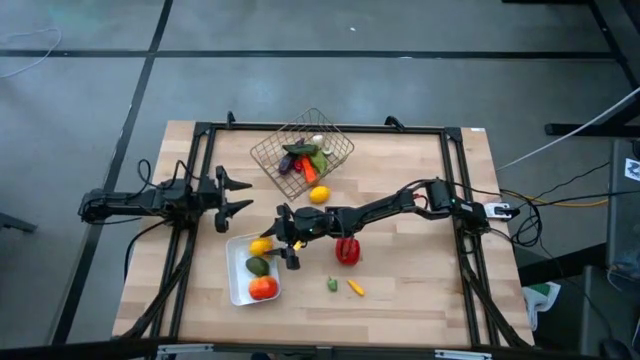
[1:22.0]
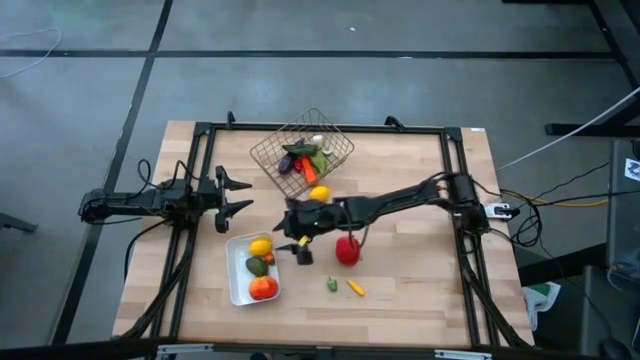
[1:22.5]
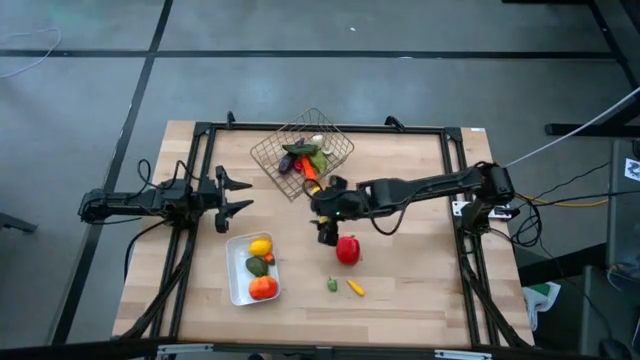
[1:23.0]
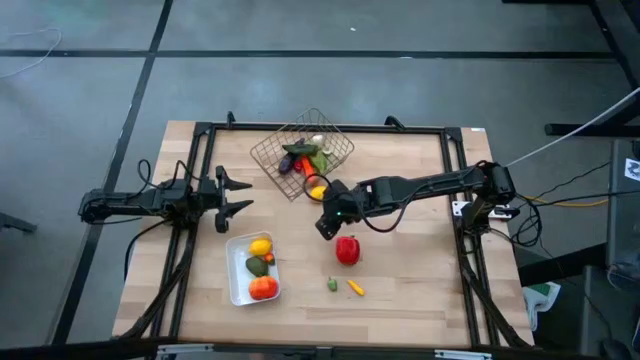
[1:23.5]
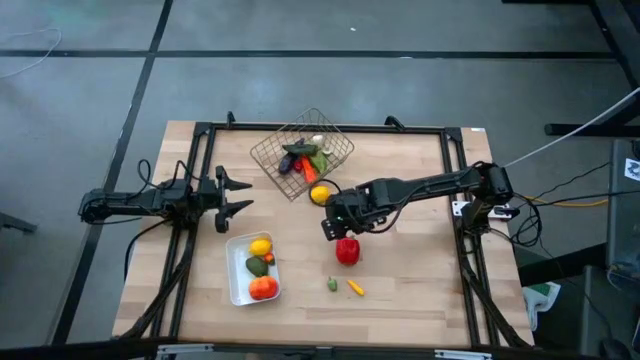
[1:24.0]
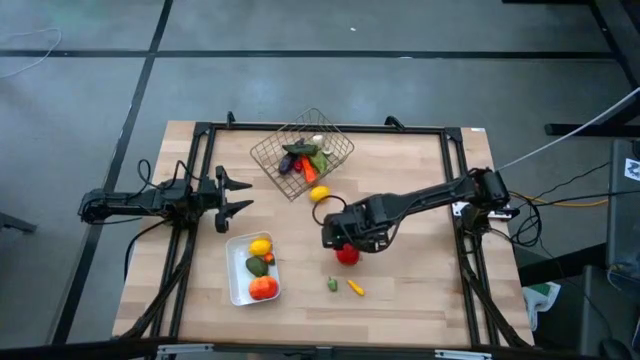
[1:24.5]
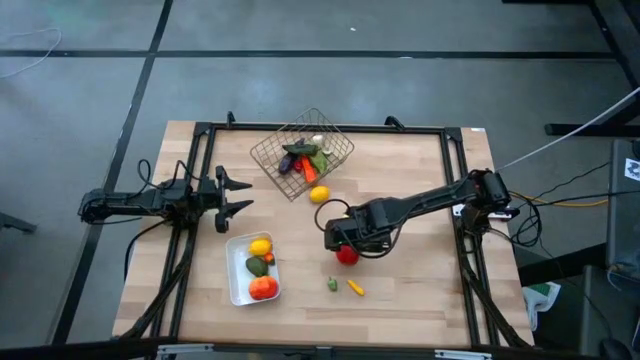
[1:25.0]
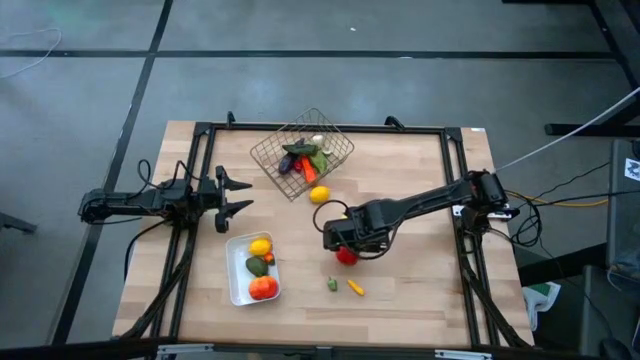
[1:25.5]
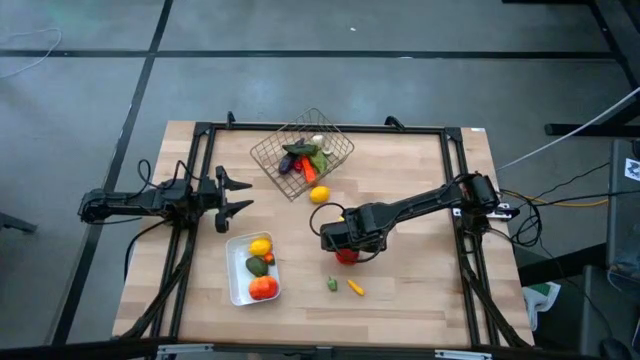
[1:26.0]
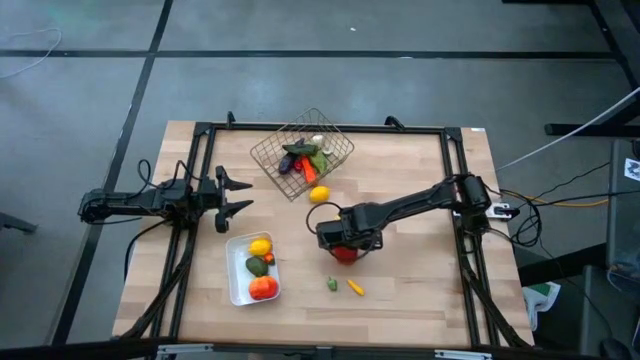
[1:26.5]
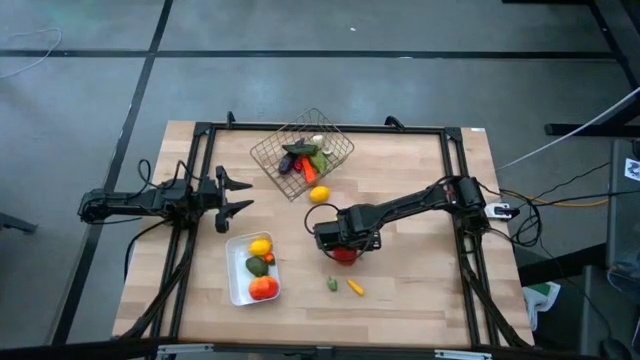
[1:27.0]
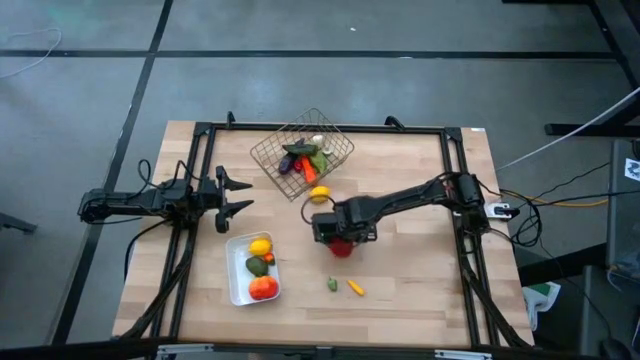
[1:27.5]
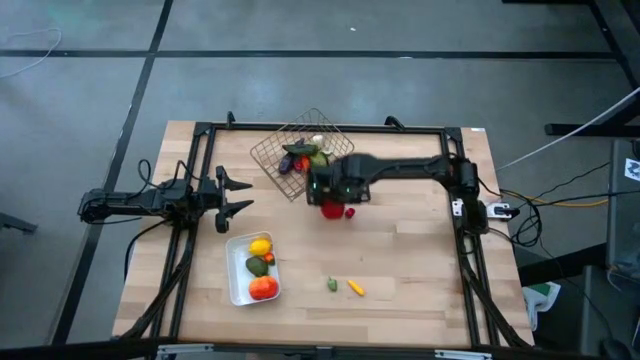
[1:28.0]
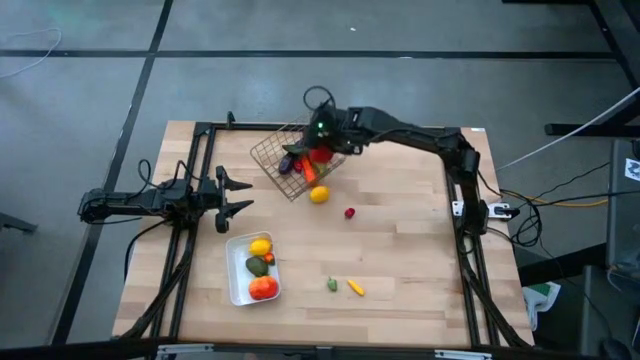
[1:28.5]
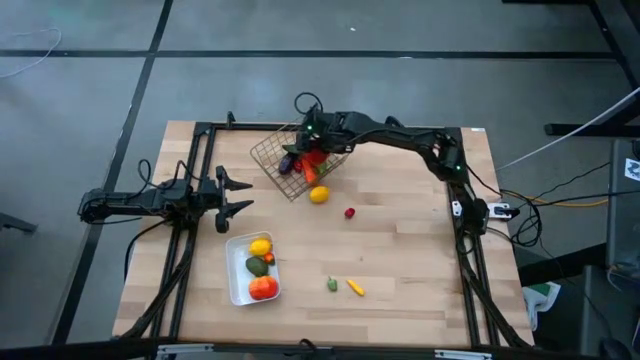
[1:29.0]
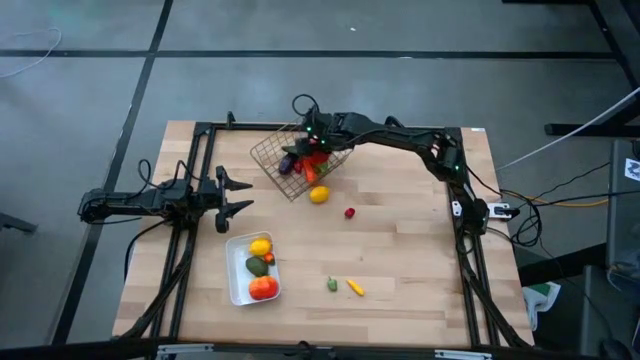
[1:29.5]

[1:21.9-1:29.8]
Task: Sort produce into baskets
Put the big red bell pepper into the gold wire basket

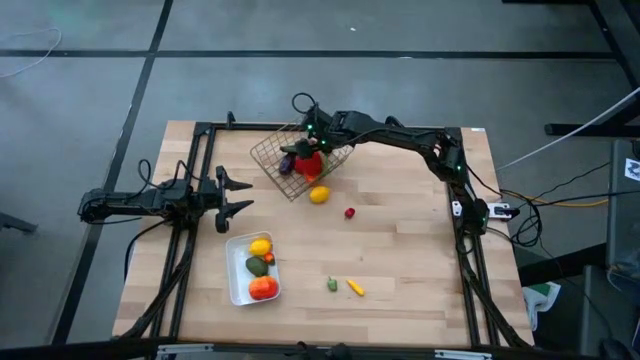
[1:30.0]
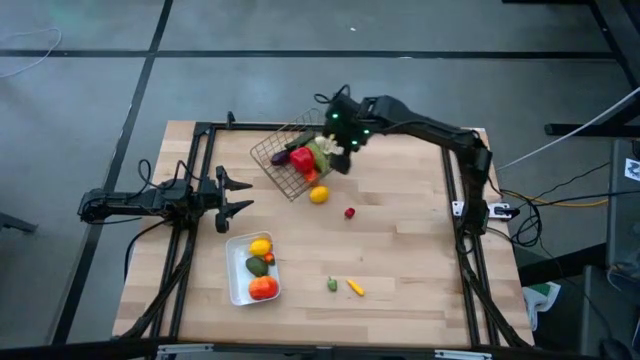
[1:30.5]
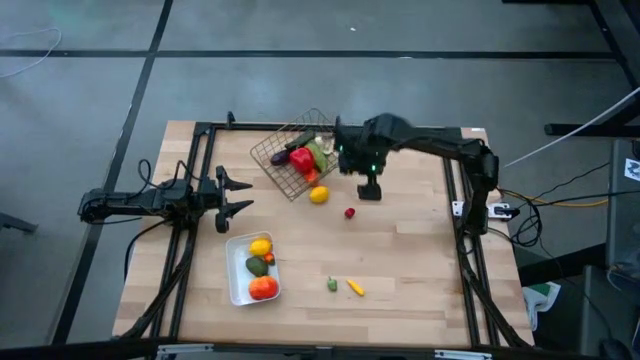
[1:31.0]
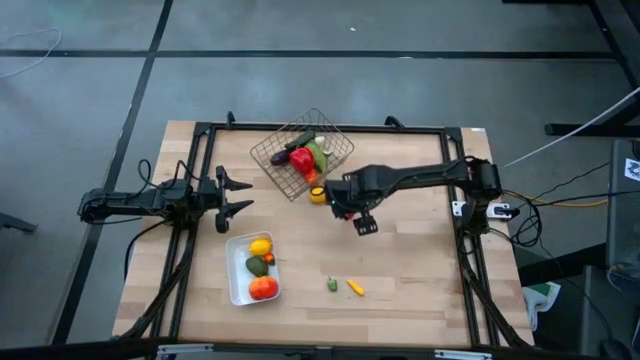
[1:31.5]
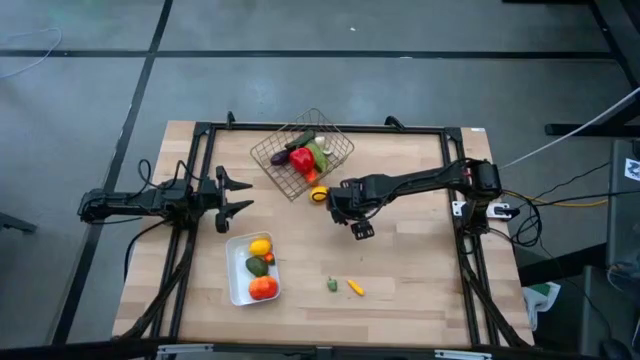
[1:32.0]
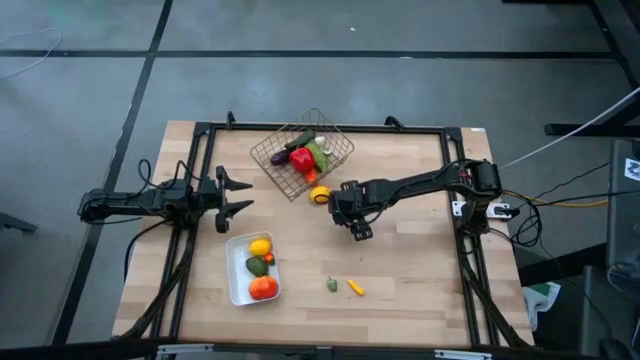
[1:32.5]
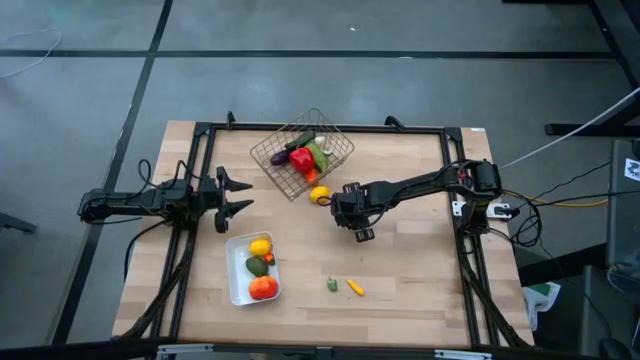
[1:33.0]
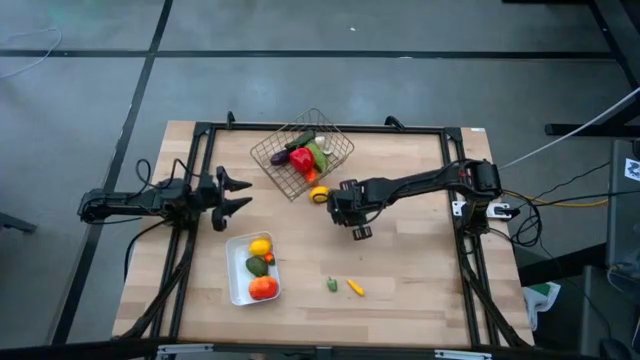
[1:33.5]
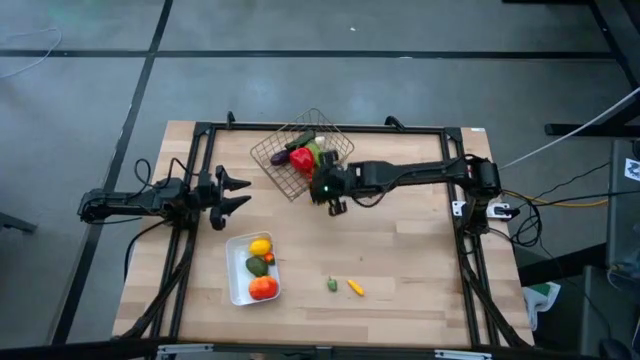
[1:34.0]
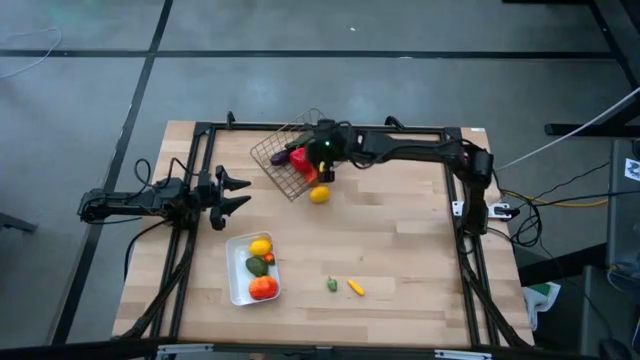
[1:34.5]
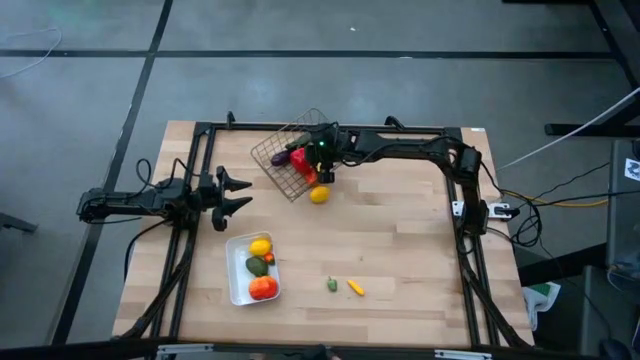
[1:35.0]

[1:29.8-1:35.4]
Put the small red bell pepper into the gold wire basket

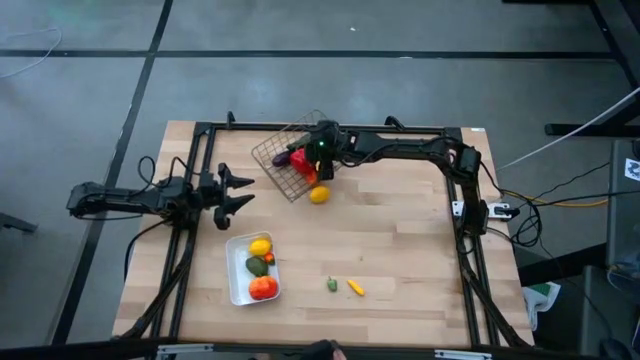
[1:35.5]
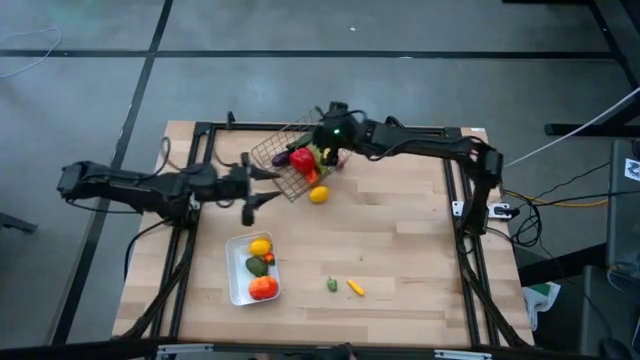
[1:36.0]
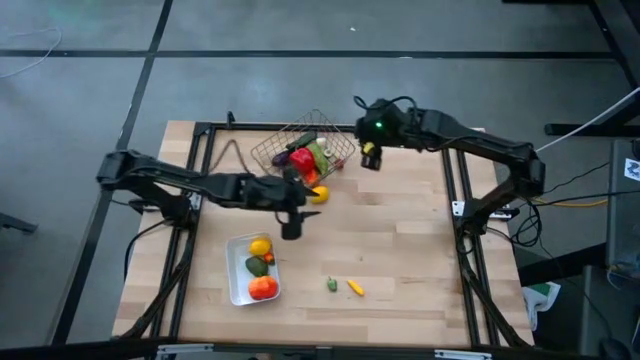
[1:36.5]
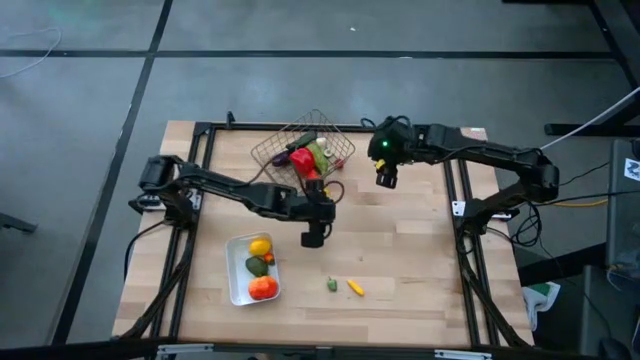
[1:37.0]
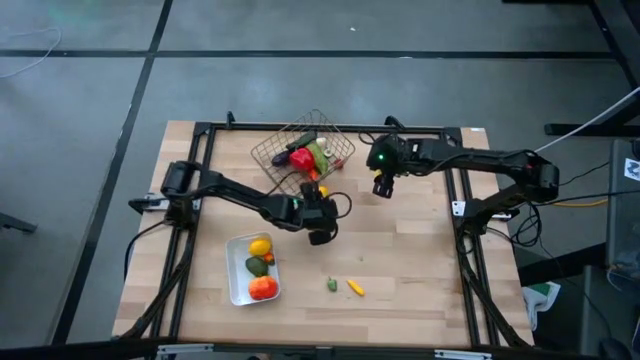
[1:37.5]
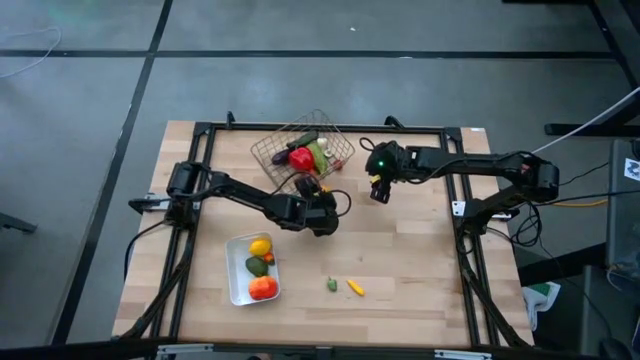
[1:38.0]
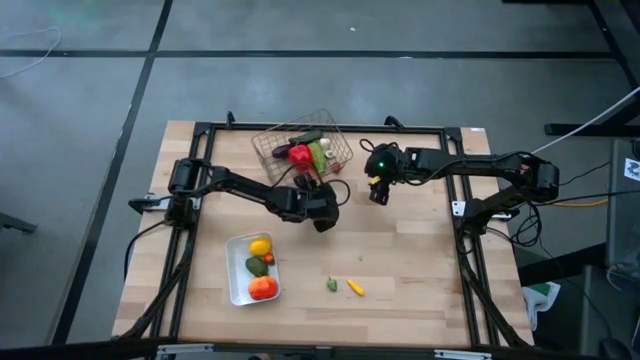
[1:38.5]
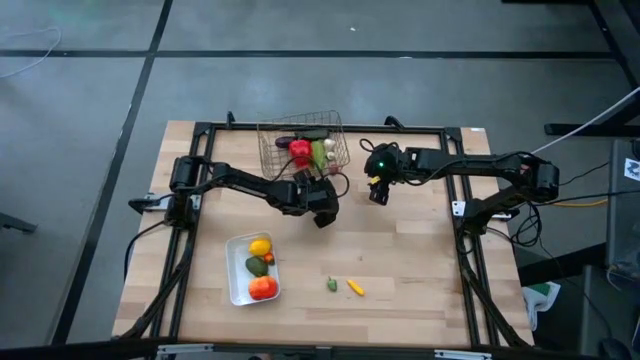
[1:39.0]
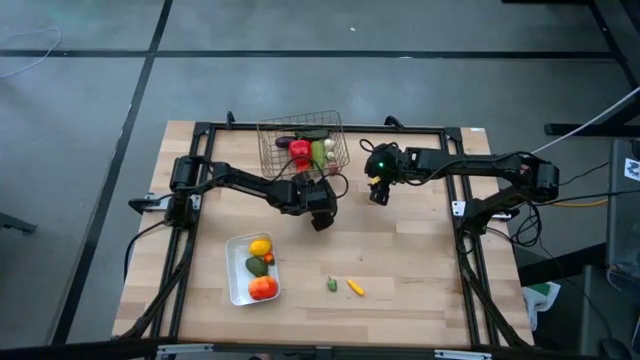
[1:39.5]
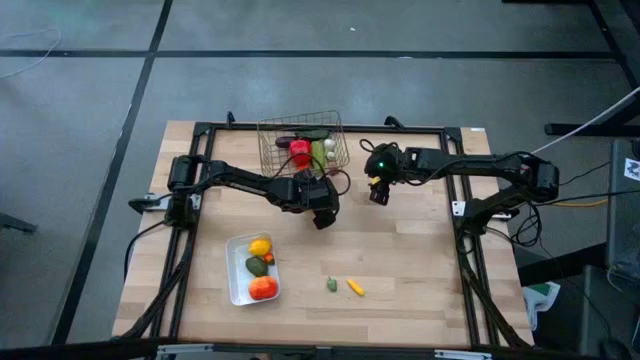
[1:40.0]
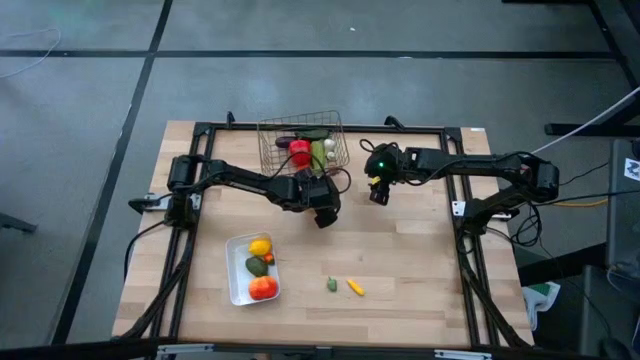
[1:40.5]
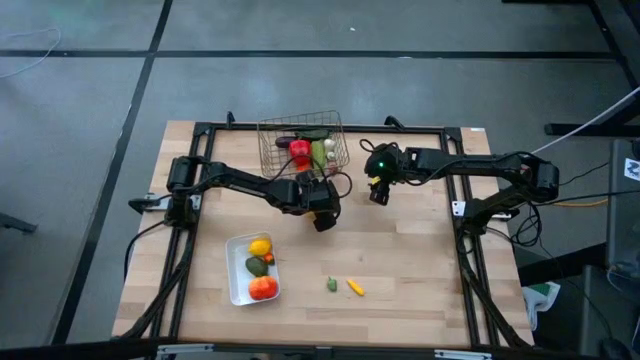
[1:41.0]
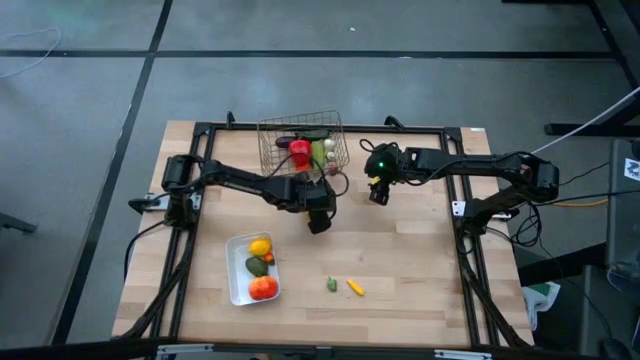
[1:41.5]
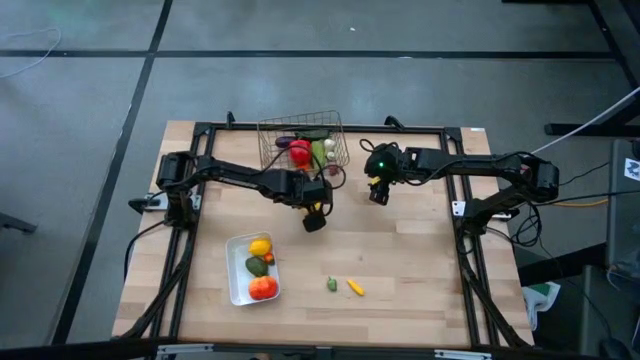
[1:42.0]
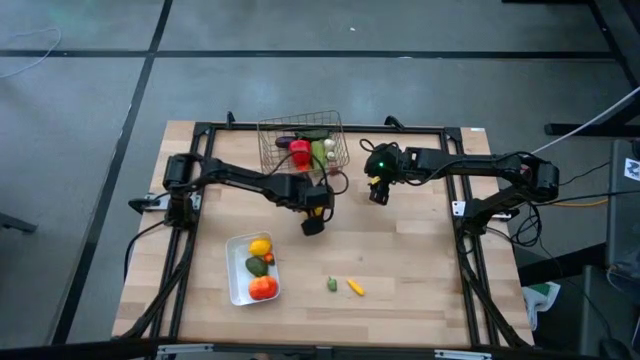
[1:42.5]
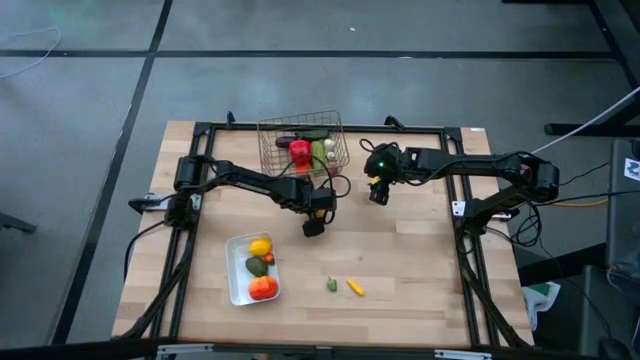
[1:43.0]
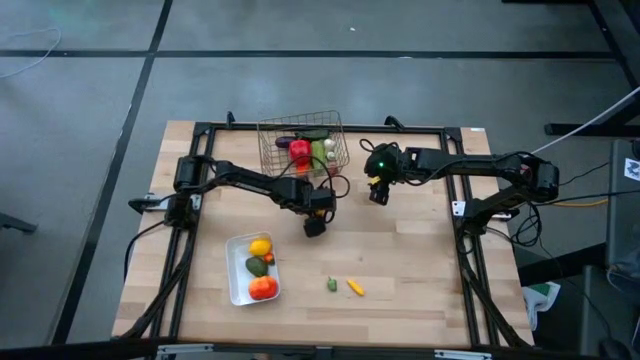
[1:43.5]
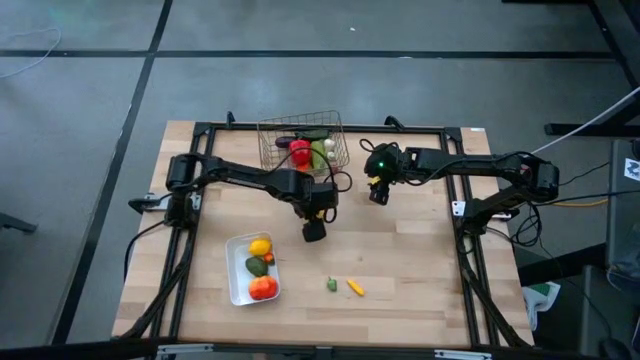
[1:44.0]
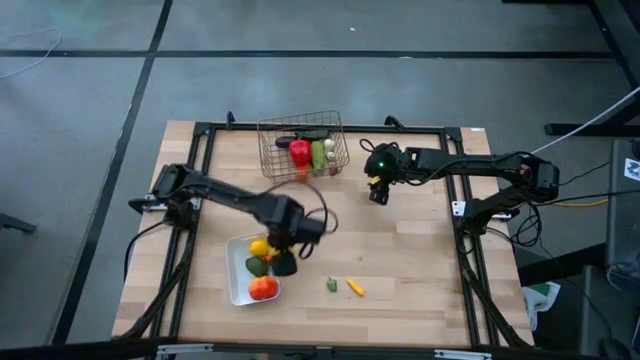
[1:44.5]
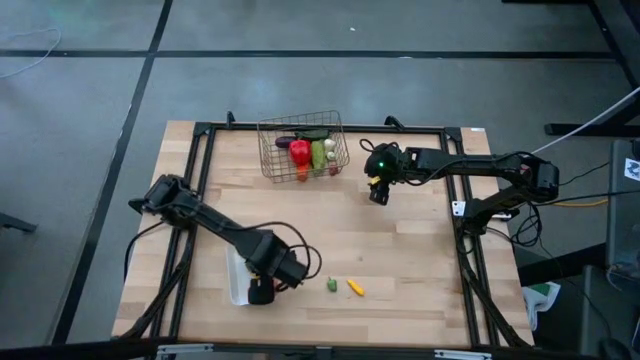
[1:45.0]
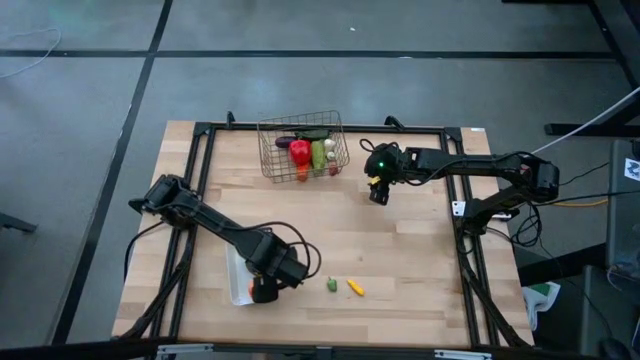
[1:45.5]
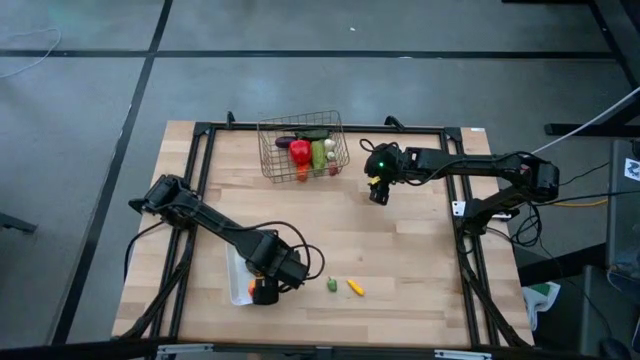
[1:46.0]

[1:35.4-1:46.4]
Put the yellow lemon into the white bin
